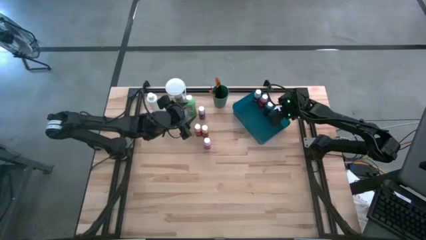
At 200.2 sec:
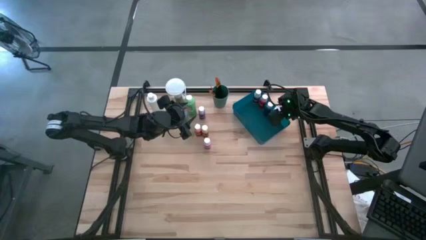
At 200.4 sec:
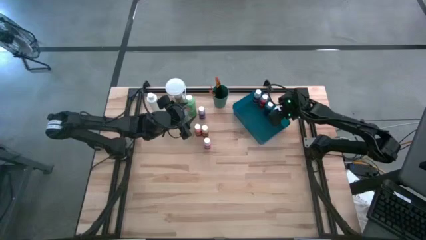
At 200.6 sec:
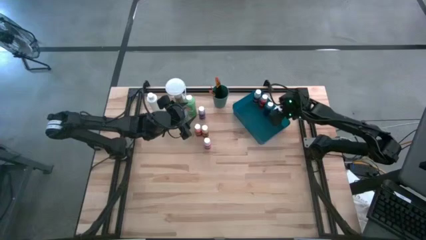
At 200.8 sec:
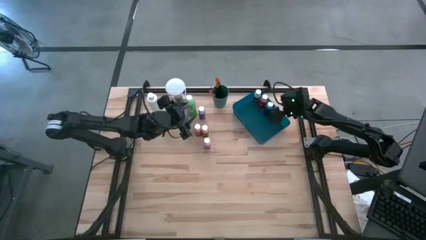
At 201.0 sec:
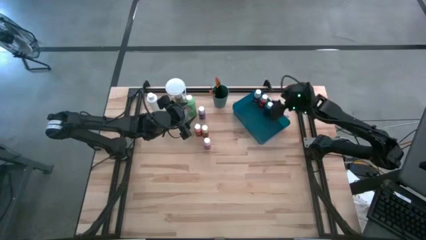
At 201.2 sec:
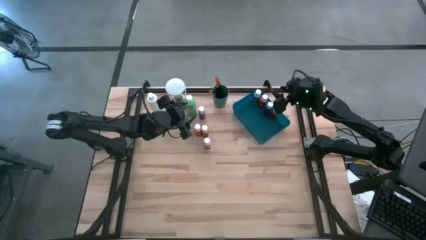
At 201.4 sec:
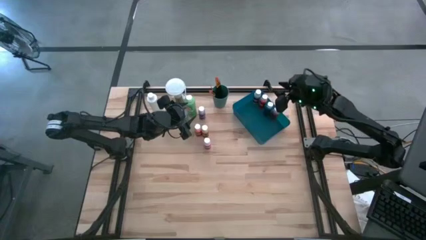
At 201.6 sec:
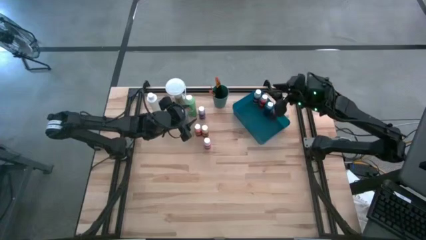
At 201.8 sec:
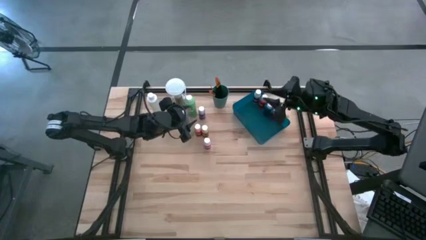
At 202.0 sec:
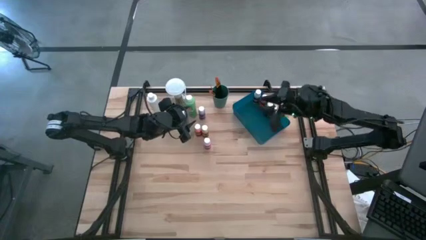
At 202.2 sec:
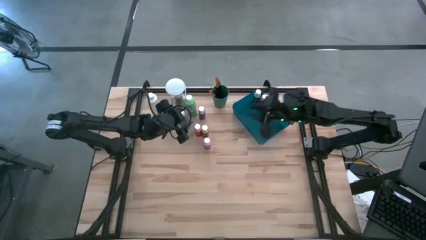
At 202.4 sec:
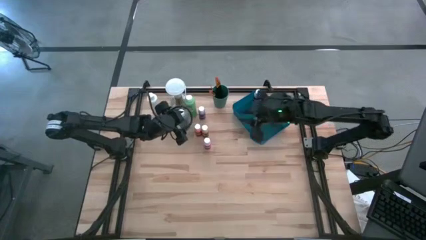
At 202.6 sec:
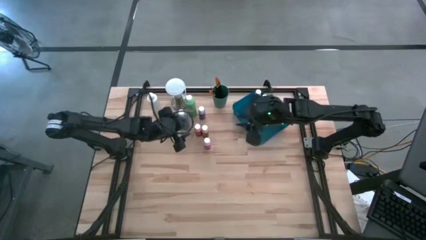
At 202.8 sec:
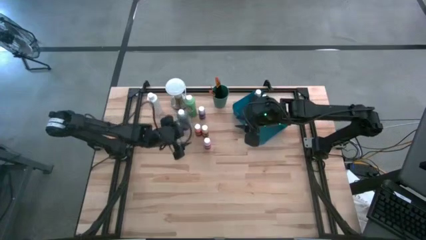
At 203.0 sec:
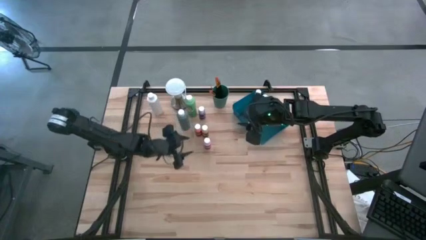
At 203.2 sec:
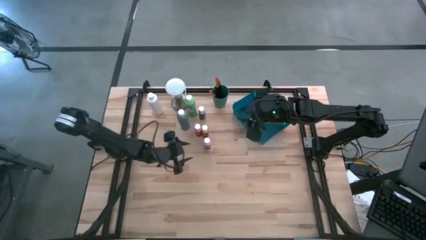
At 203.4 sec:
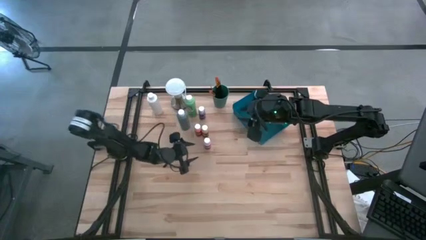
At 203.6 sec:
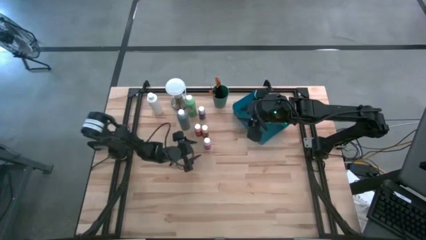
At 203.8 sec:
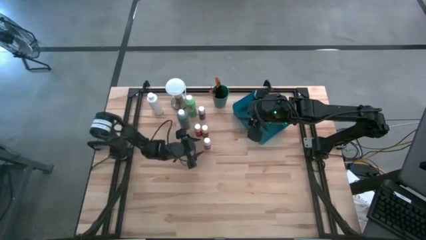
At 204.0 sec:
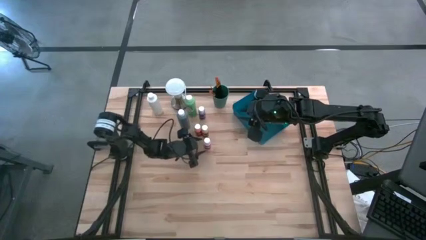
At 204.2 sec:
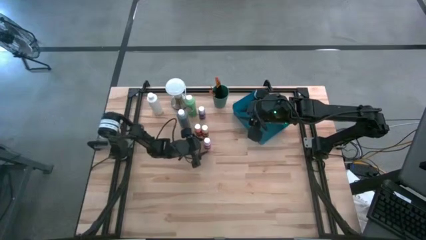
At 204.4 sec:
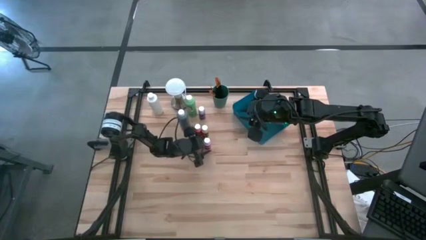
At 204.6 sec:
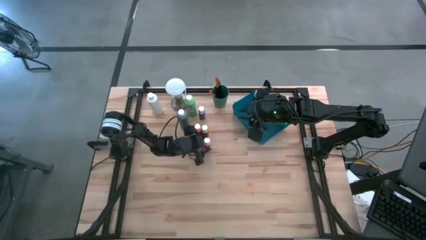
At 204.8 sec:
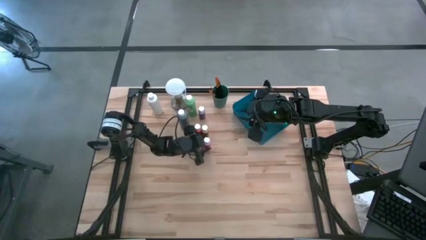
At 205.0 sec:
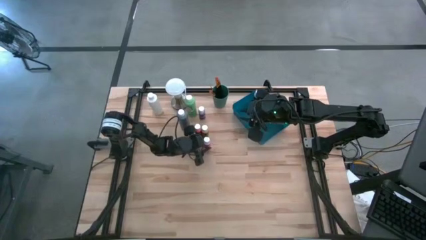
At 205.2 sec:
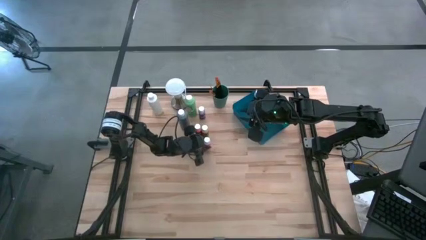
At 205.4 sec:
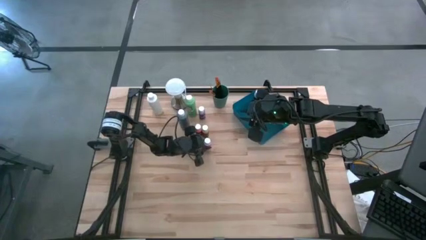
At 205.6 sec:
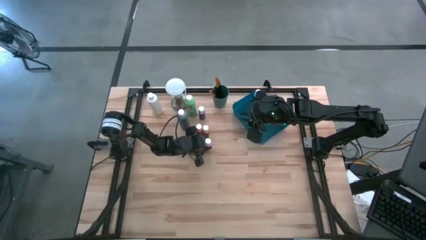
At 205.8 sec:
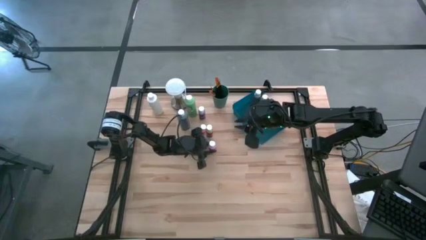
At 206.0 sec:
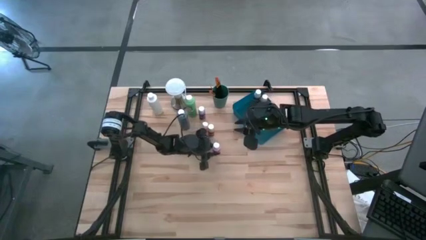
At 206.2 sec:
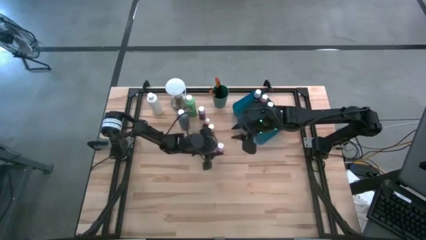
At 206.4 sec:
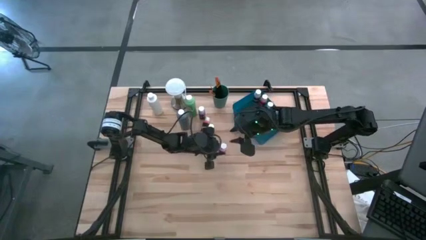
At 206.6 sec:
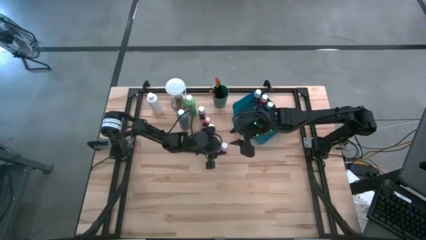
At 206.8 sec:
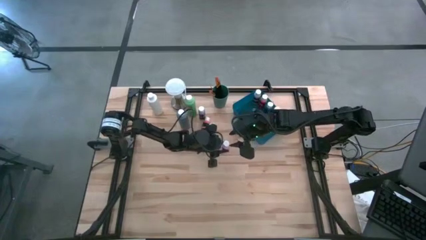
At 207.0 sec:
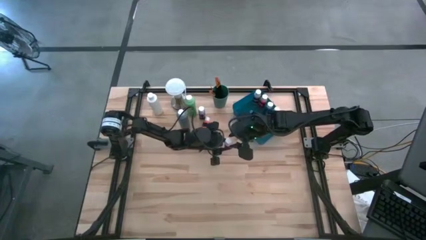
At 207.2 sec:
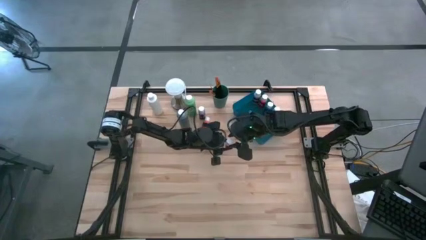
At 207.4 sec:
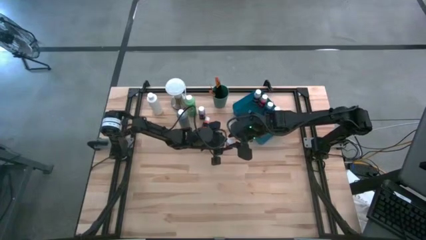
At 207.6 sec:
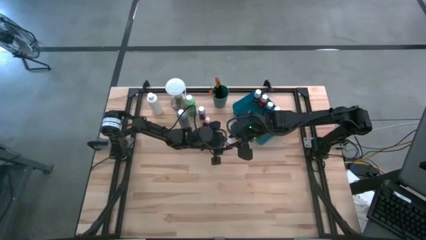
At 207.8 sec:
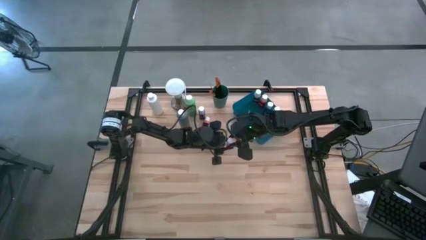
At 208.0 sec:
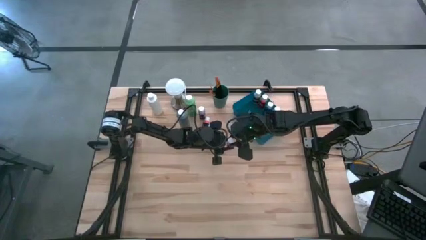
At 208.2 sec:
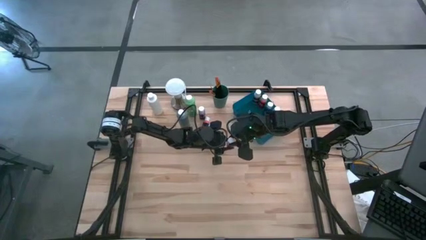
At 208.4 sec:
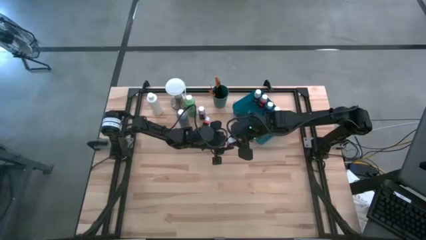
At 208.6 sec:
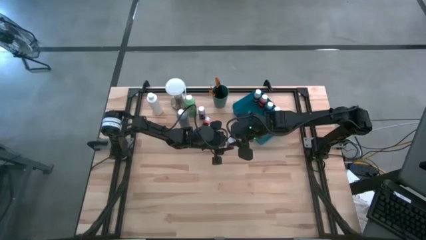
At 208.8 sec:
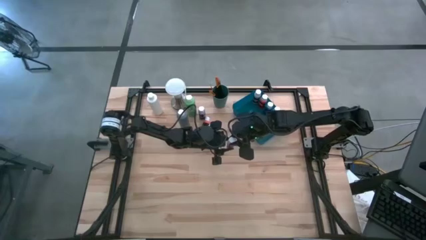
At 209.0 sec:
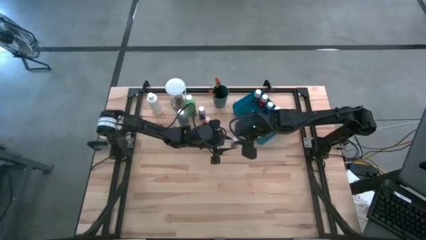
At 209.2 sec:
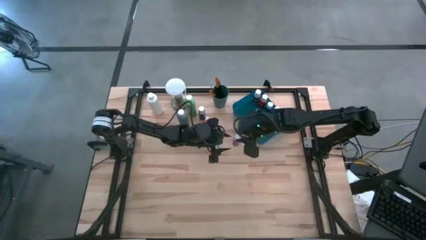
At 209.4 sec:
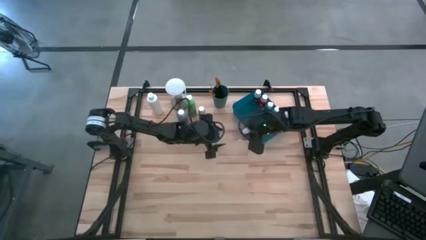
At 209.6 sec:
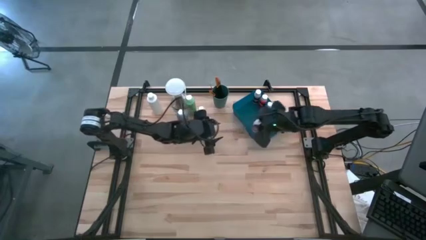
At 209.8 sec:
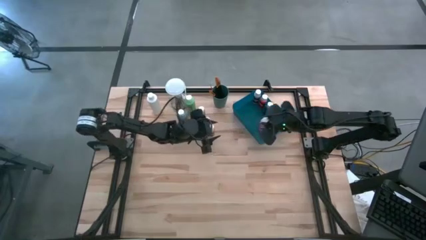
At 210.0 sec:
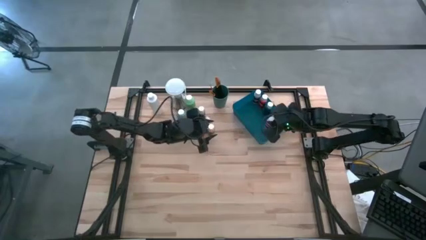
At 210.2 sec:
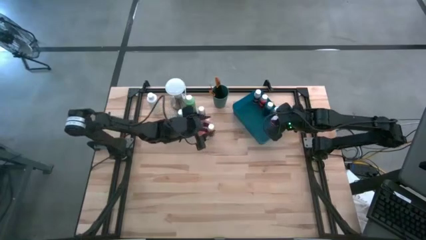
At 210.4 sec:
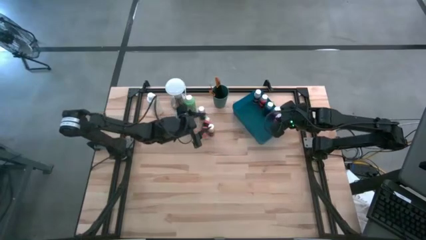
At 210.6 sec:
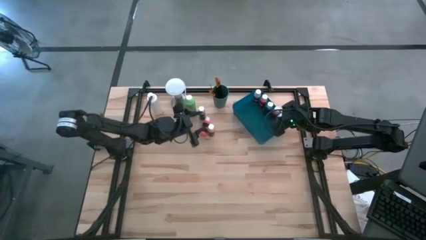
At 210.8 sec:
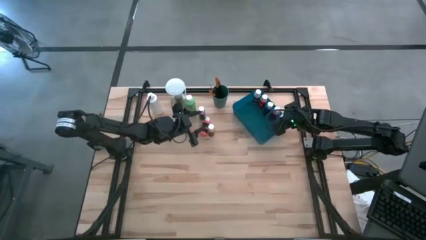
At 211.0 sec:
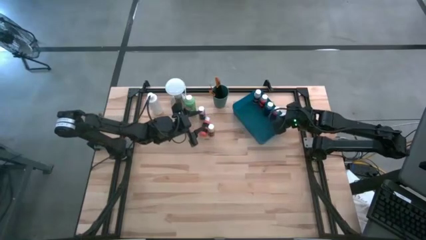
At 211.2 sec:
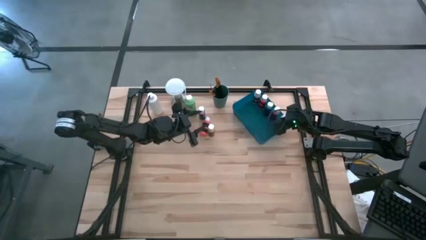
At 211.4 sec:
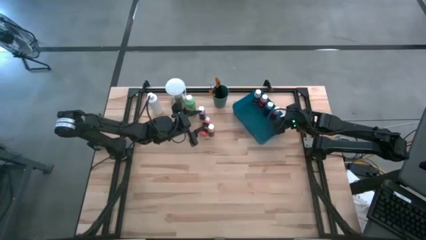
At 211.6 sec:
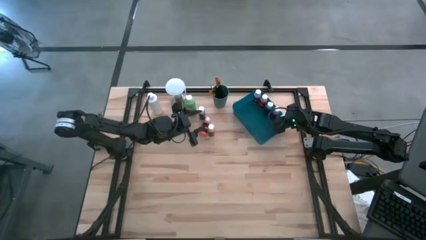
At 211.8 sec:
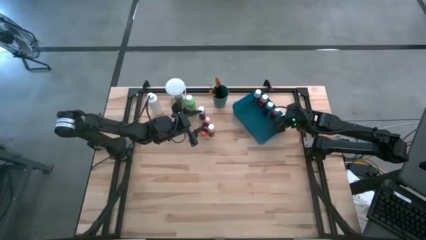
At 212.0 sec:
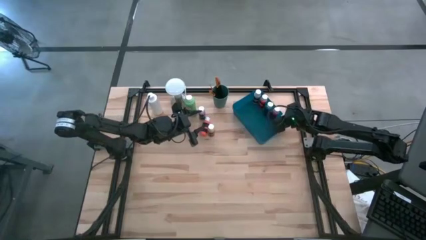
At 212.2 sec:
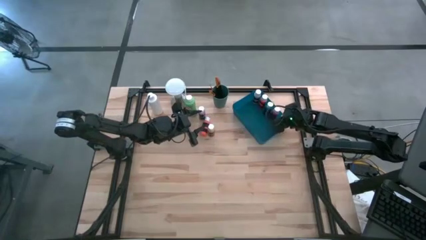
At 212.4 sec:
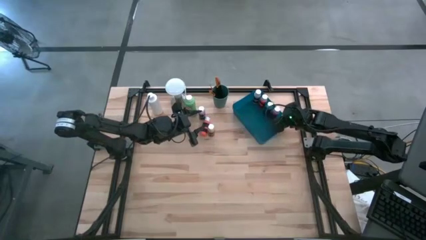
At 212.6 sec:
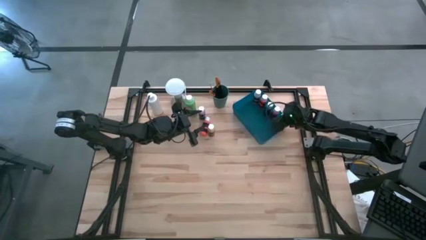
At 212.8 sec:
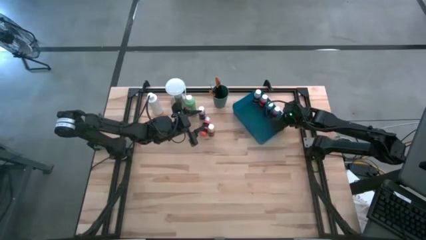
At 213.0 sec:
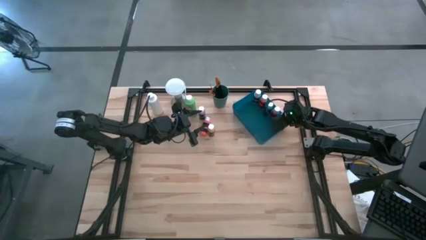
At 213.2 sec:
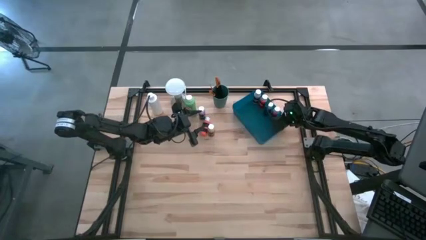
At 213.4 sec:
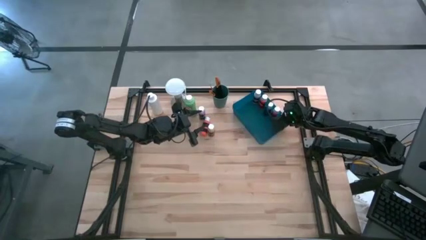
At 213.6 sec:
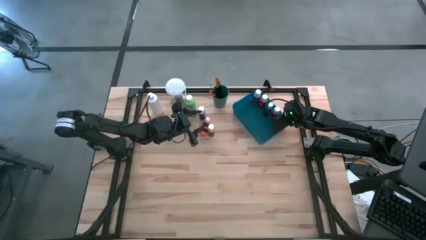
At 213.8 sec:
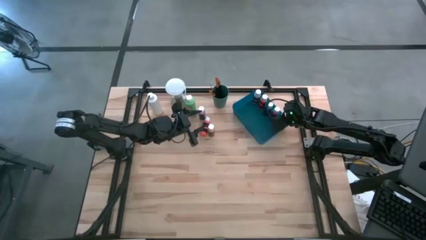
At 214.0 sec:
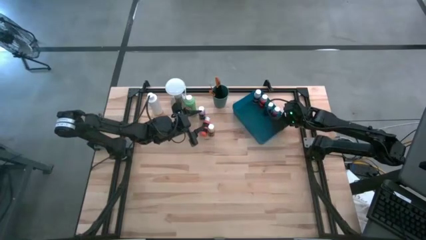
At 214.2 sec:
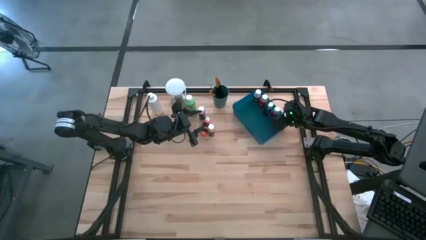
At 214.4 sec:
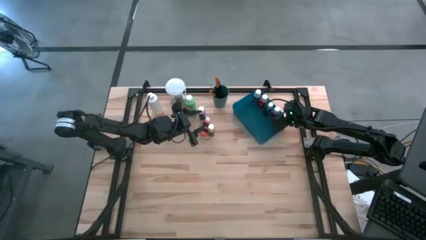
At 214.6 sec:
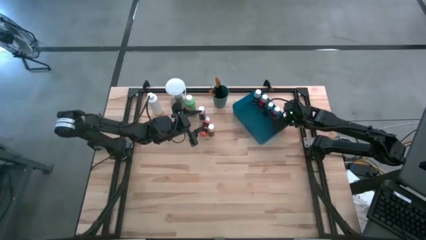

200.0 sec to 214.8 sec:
Task: Pick & Place Paint Supplies
Put the pink paint bottle into the blue bin
